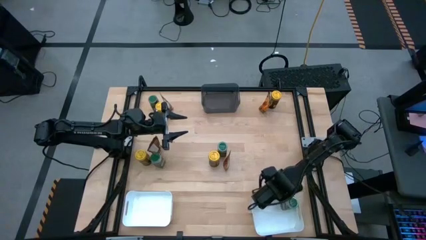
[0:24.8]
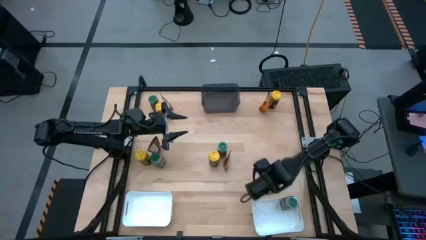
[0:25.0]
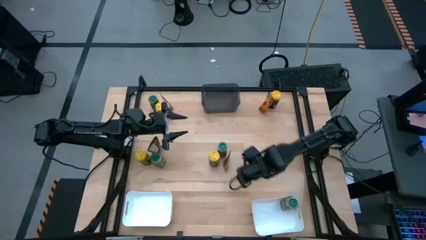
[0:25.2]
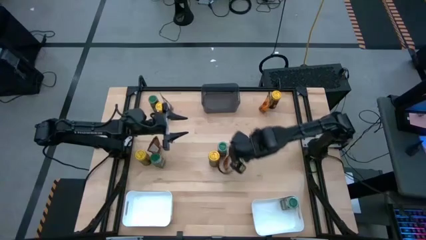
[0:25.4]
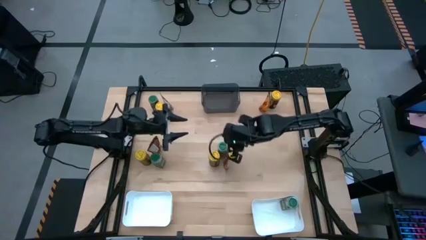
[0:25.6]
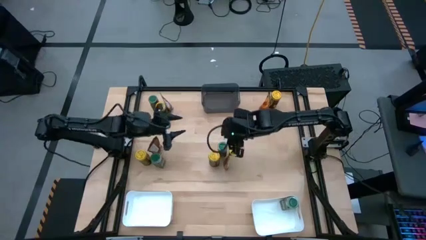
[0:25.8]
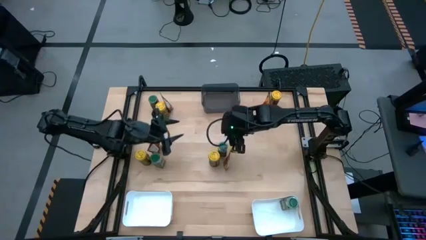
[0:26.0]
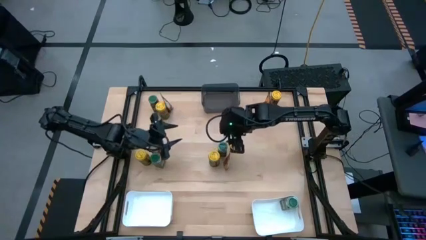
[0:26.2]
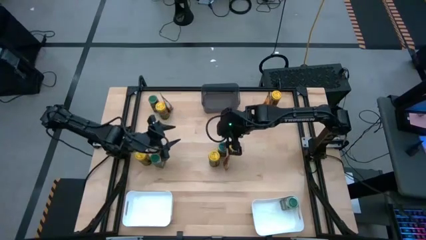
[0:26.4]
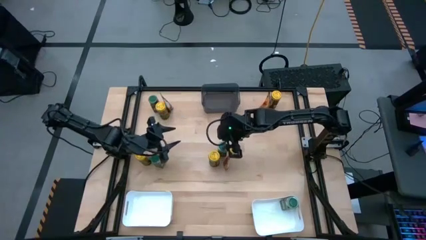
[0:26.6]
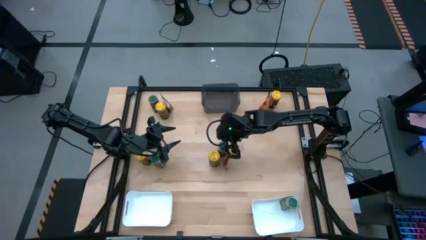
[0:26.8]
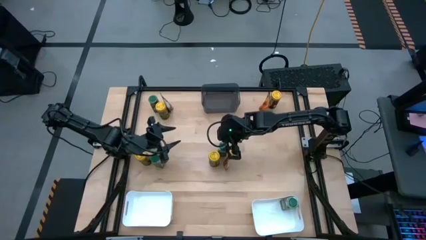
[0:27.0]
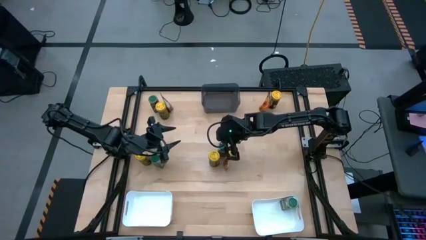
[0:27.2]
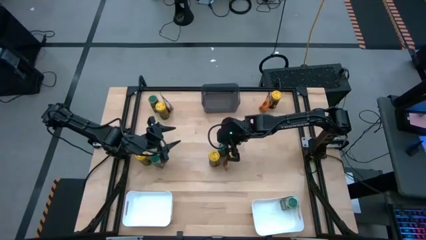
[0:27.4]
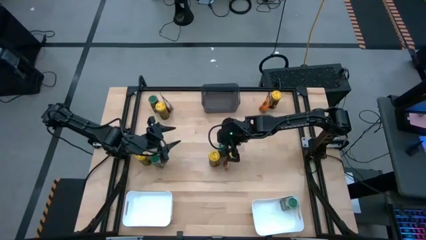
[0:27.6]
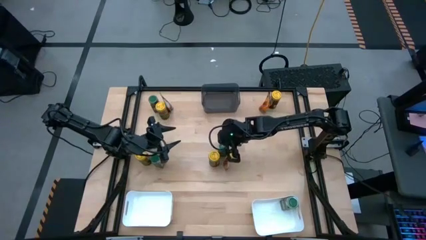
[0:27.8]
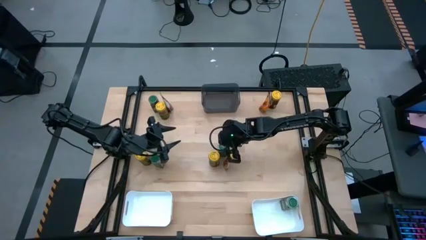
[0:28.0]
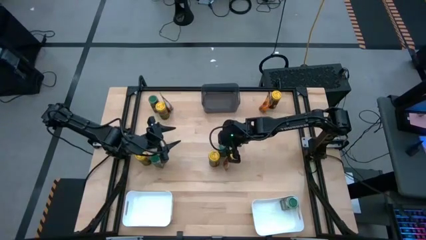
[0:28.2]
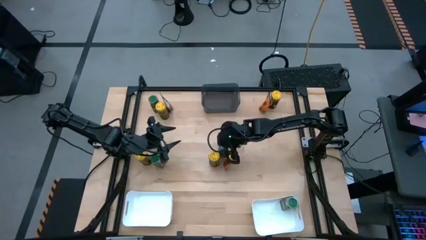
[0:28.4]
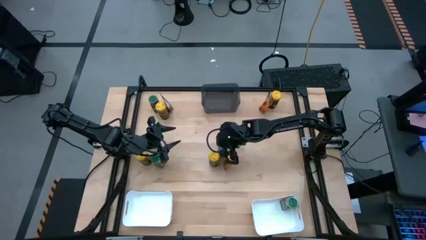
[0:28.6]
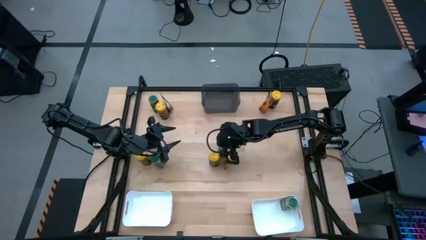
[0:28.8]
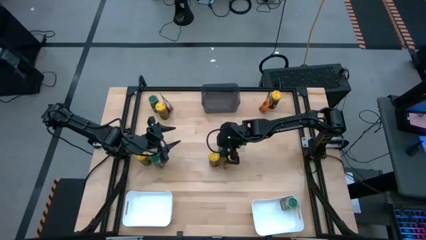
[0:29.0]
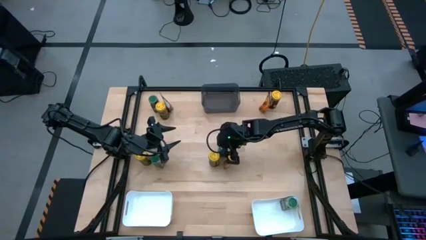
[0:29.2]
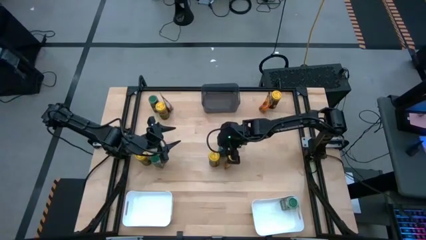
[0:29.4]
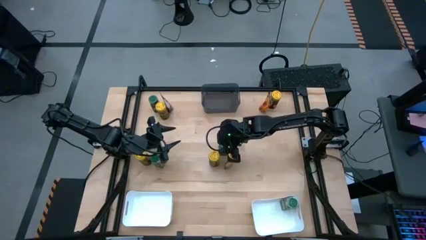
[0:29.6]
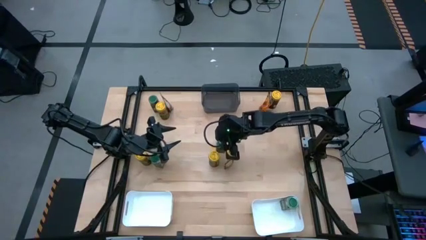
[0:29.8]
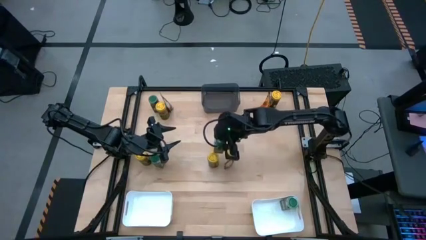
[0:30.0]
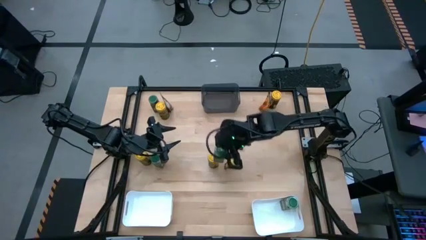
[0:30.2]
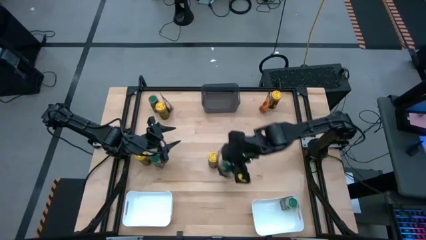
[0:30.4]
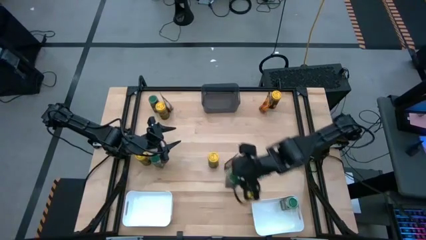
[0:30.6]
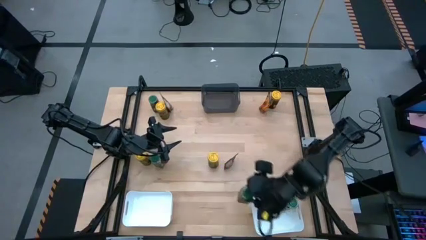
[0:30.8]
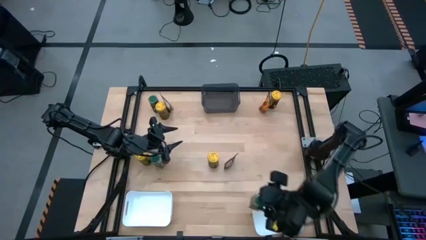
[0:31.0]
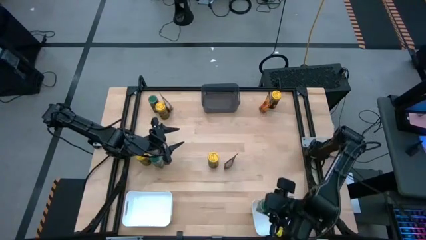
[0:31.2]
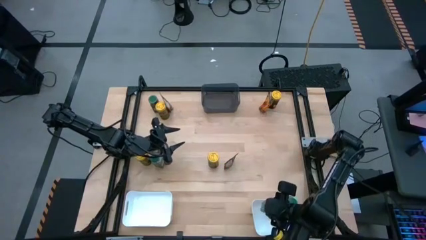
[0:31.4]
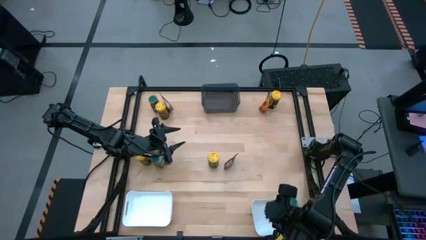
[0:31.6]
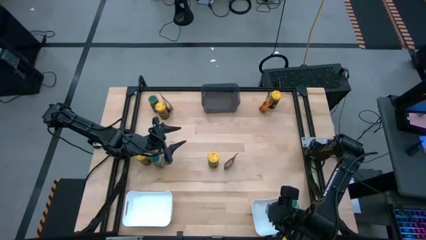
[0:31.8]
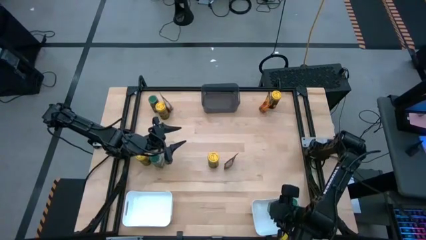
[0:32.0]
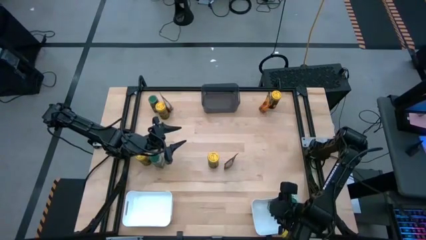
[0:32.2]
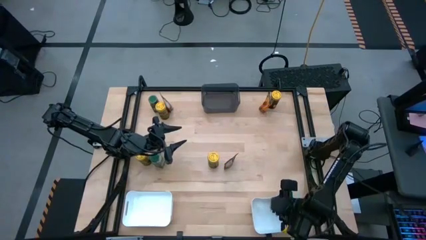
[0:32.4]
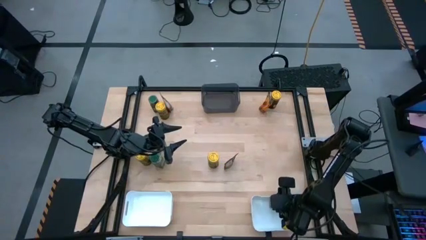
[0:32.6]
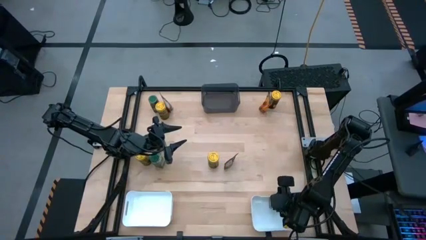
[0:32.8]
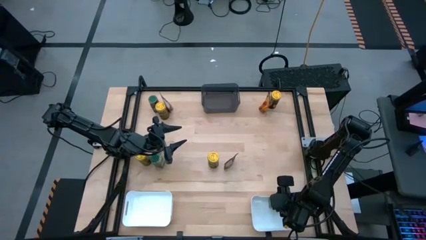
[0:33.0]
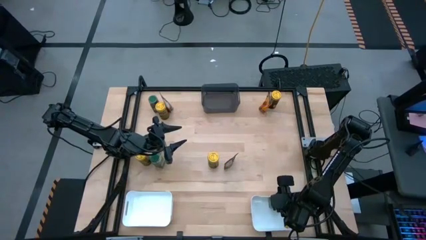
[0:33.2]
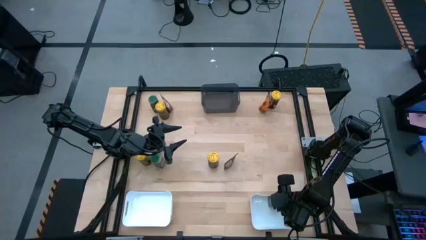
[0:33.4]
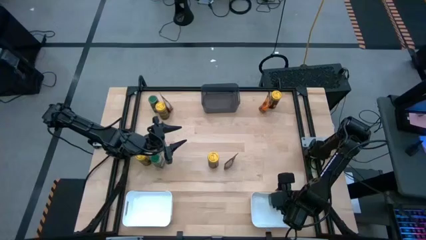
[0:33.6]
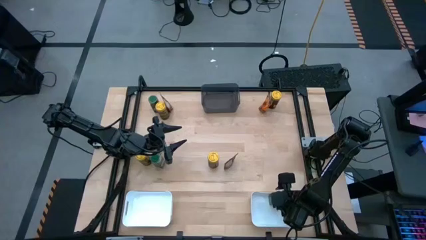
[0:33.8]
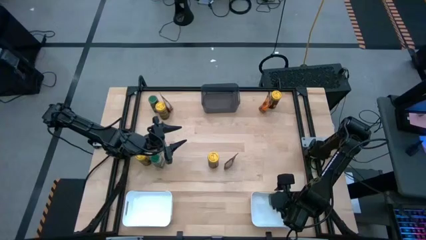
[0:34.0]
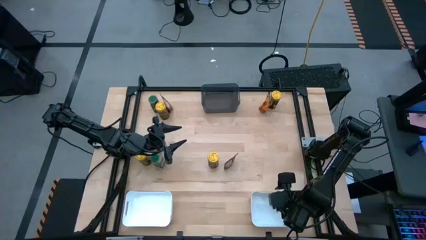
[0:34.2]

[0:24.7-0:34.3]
Task: Sort spices by type
Put the bottom right green seasoning bottle into the right white bin

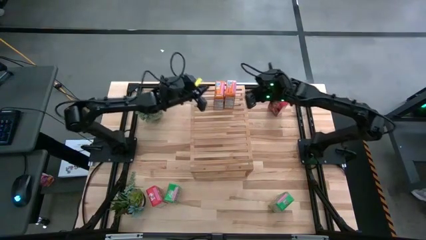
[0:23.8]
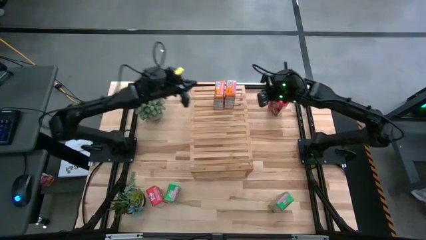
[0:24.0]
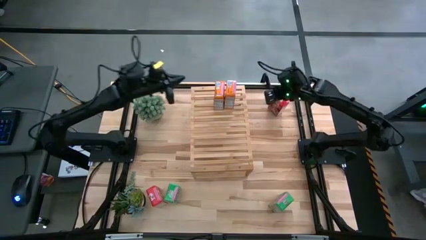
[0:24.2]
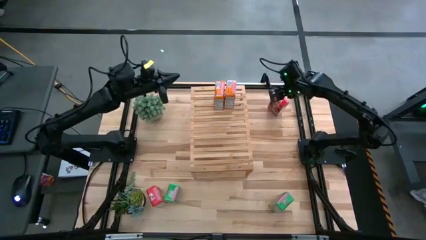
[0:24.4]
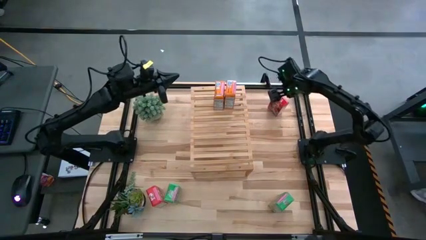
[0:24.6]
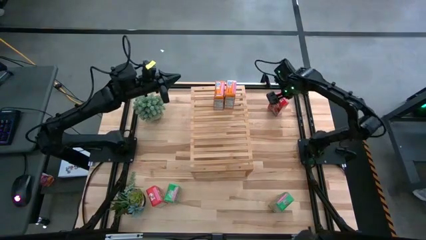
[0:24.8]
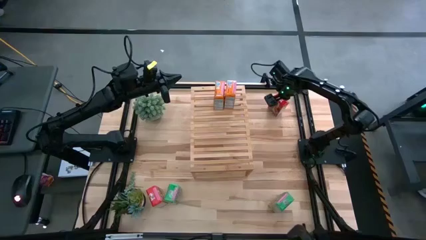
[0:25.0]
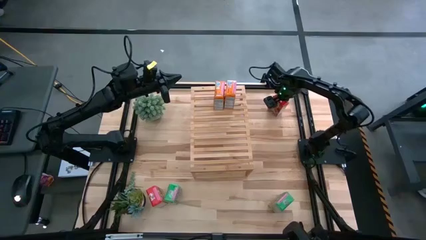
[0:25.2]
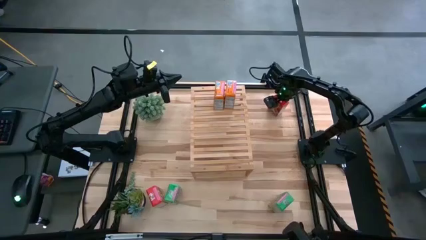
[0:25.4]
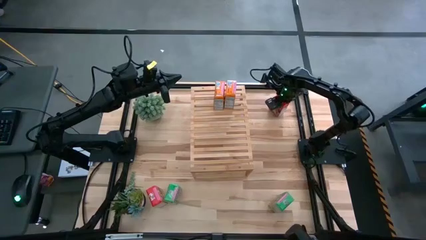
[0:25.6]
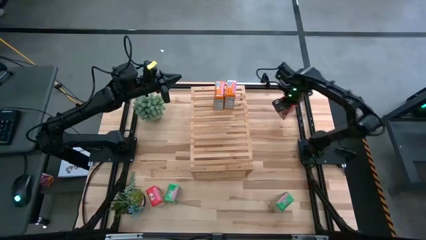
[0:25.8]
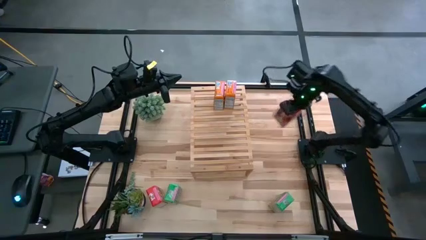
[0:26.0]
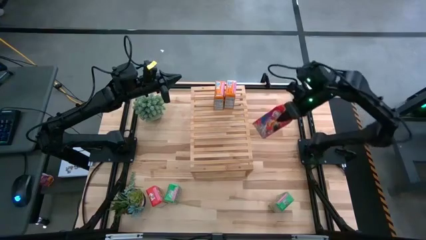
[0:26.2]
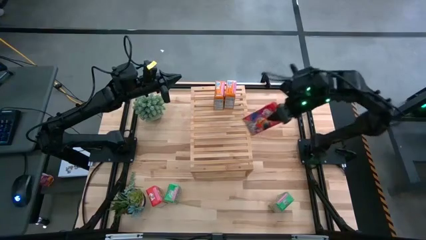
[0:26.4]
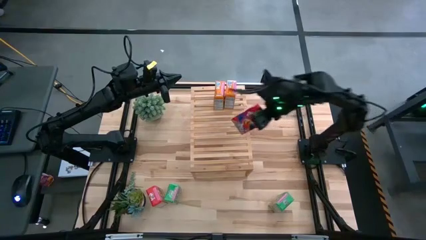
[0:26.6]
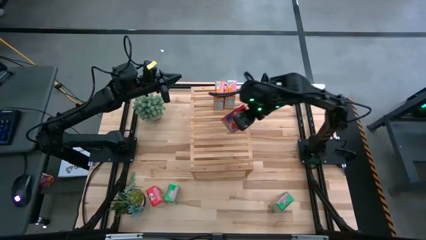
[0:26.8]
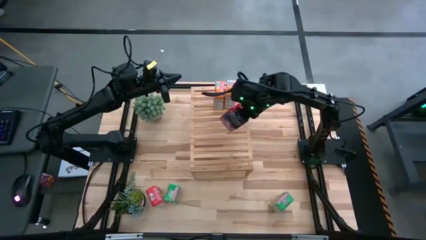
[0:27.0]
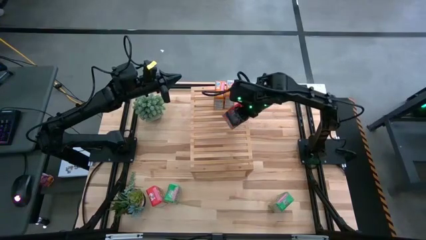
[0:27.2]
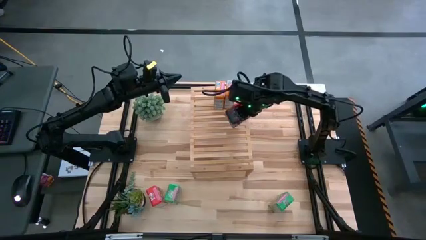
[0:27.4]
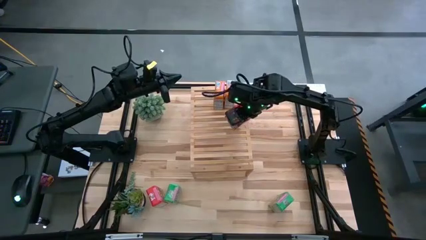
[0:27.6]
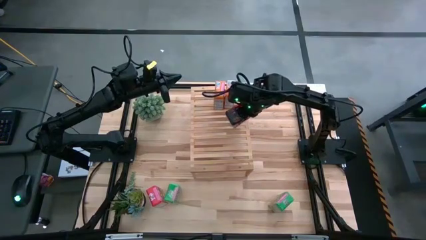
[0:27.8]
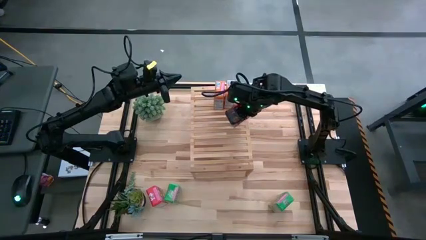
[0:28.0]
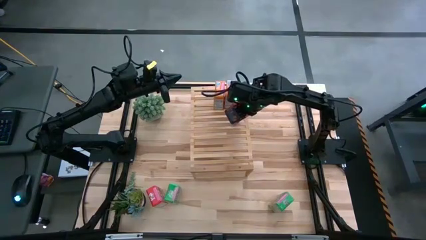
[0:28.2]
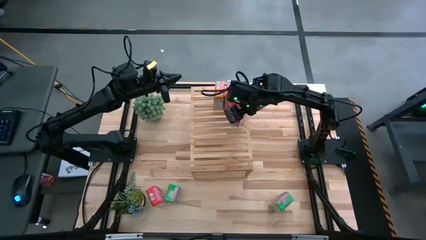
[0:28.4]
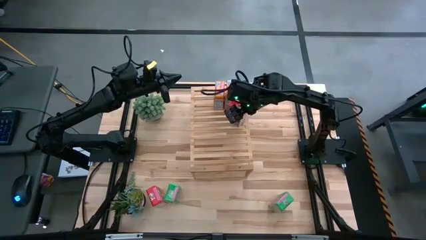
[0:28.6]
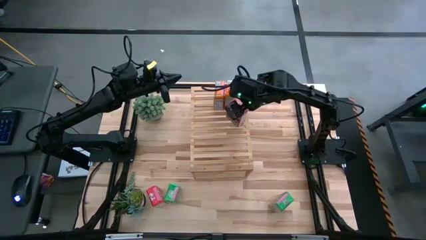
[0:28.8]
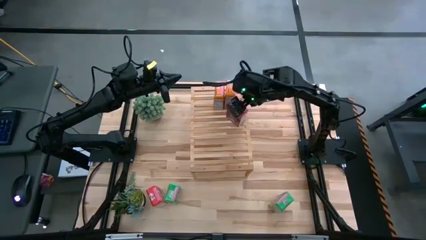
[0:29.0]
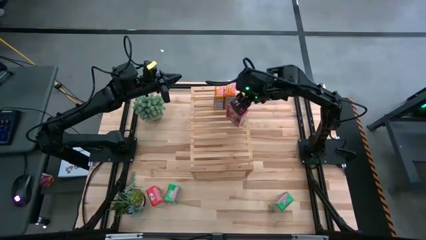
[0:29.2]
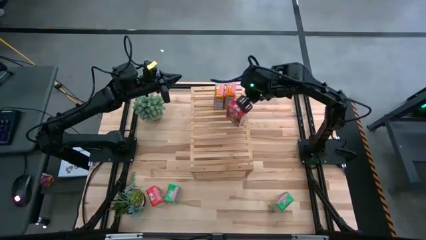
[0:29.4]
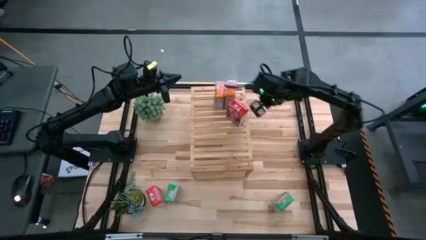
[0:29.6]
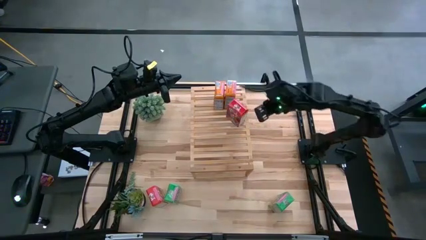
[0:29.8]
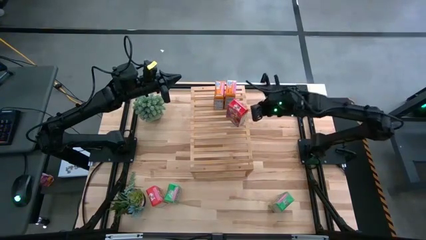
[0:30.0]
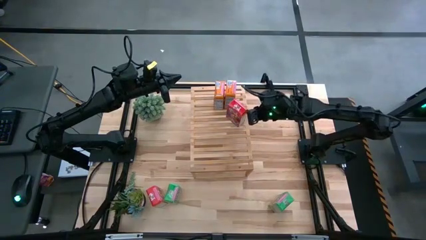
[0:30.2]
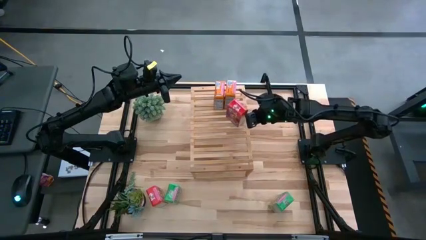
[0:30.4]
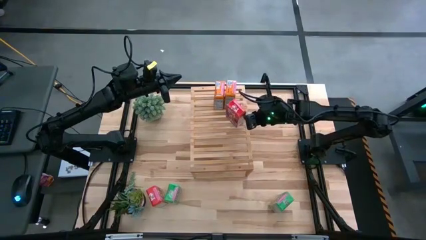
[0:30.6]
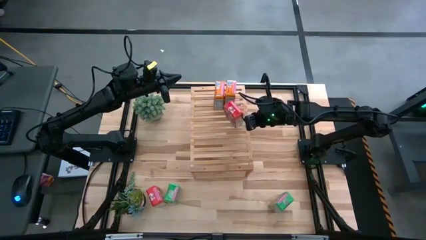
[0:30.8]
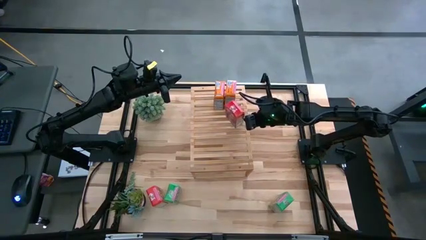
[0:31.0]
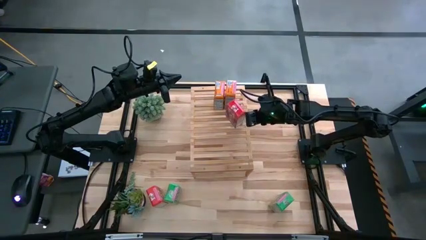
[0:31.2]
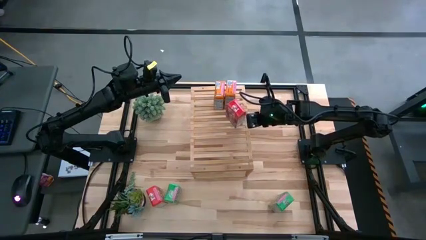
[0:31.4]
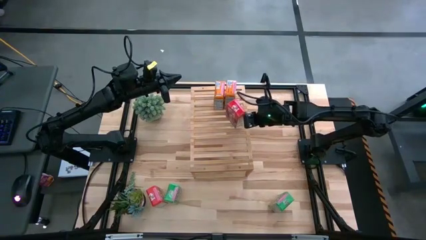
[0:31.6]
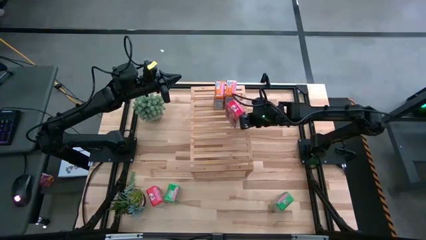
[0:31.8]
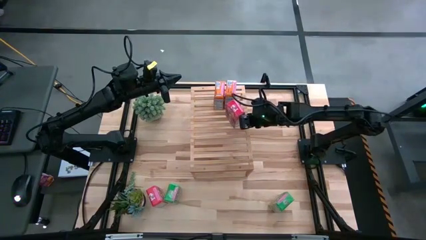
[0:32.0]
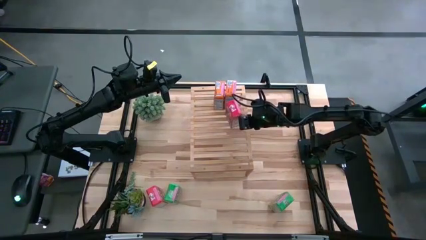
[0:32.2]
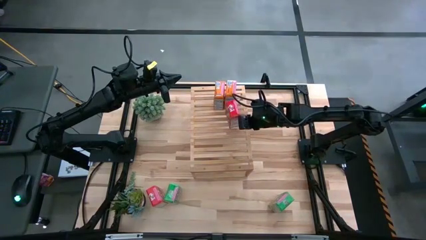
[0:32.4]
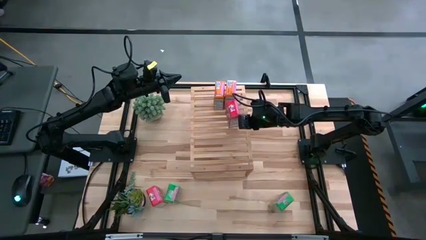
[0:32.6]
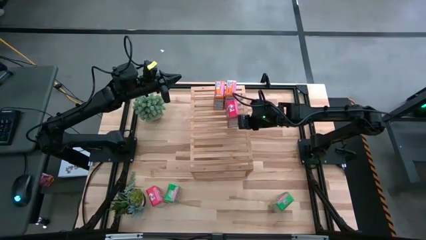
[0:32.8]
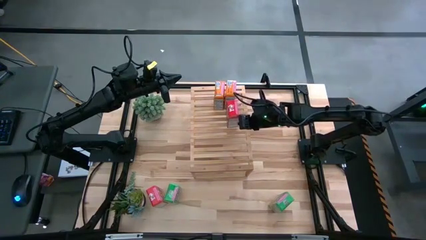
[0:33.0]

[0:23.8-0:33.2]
Task: Stack cereal on shelf
Put the top red cereal box on the shelf
